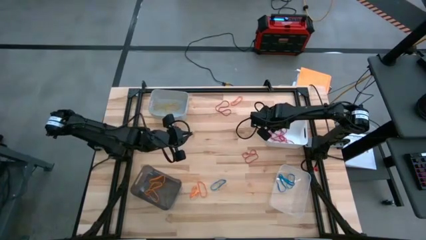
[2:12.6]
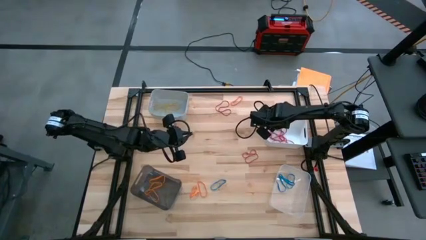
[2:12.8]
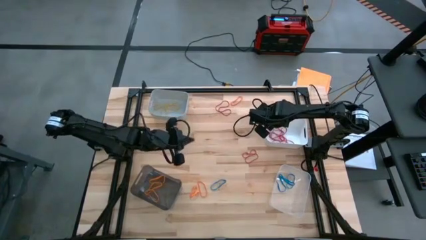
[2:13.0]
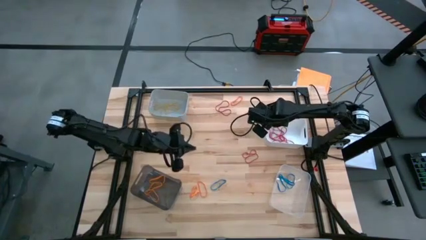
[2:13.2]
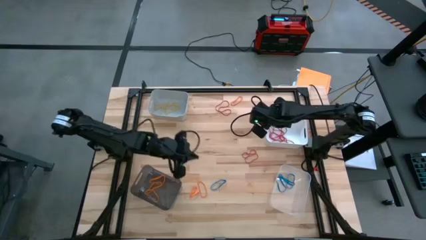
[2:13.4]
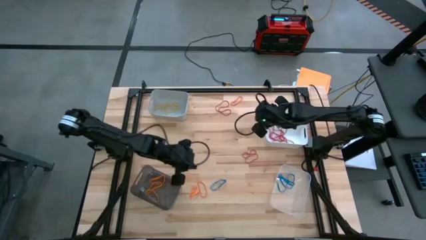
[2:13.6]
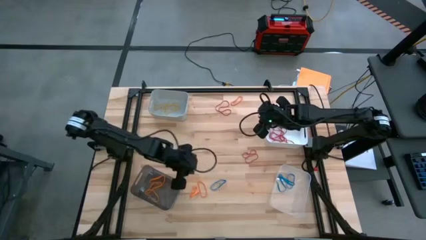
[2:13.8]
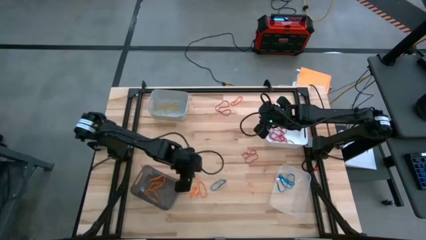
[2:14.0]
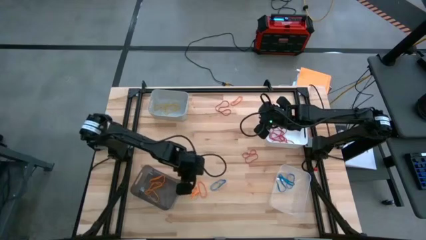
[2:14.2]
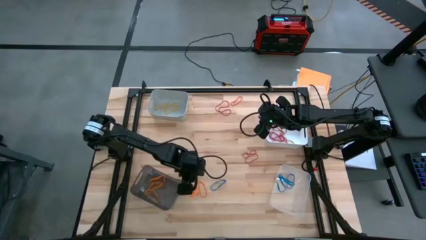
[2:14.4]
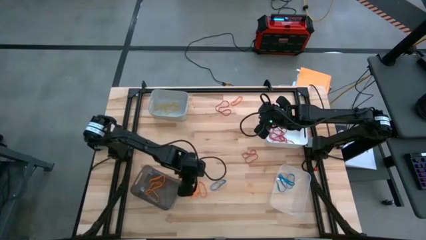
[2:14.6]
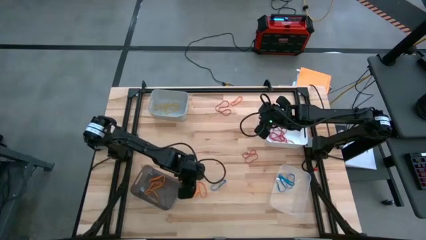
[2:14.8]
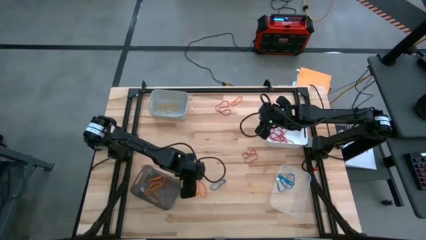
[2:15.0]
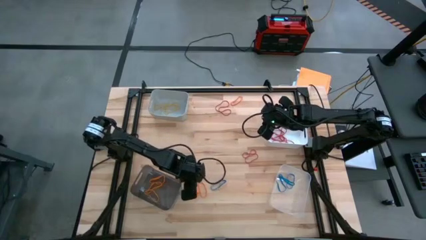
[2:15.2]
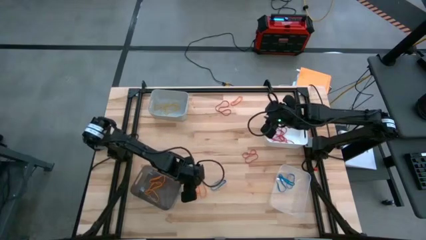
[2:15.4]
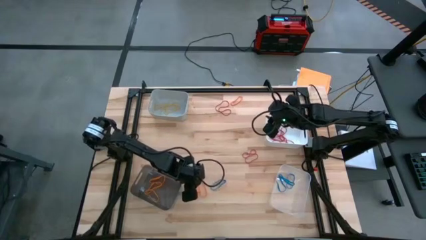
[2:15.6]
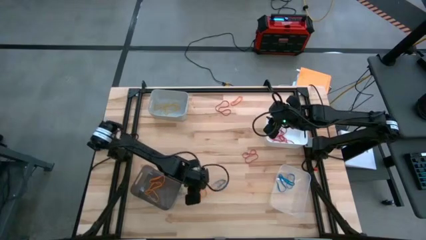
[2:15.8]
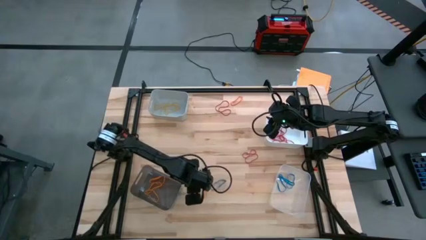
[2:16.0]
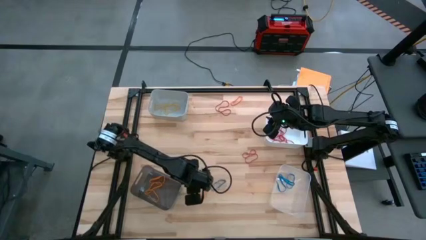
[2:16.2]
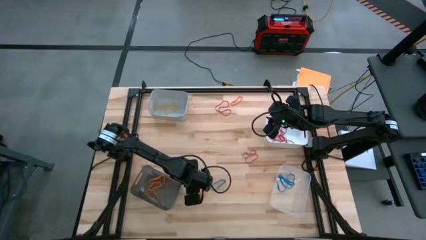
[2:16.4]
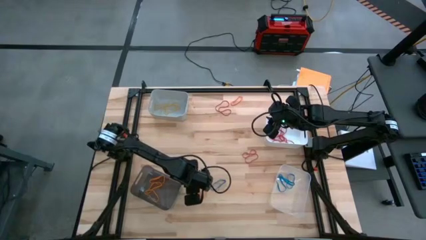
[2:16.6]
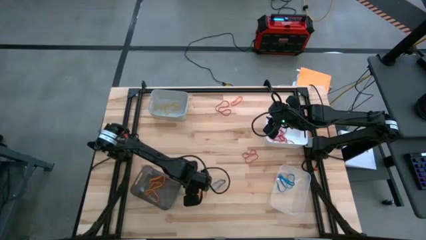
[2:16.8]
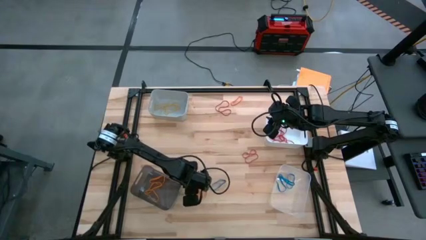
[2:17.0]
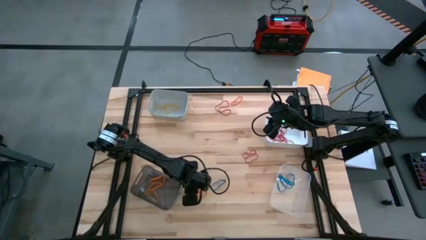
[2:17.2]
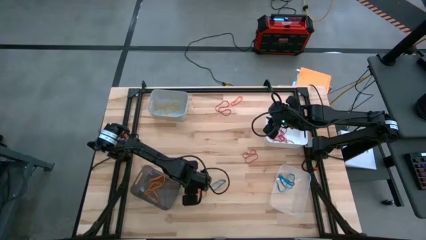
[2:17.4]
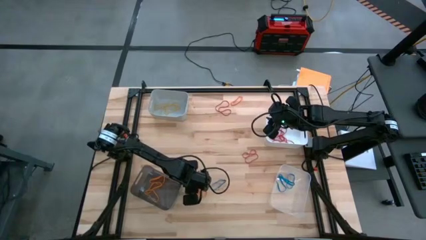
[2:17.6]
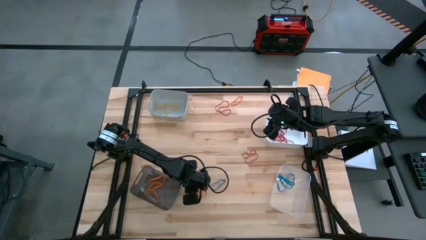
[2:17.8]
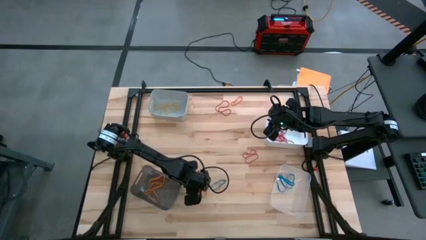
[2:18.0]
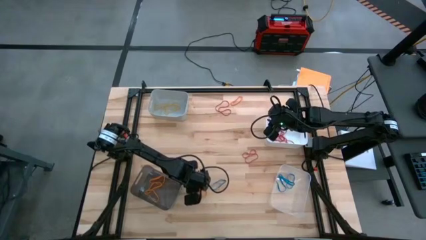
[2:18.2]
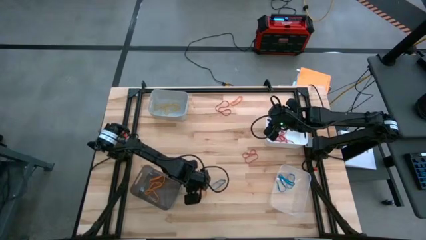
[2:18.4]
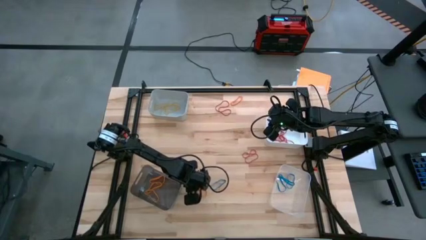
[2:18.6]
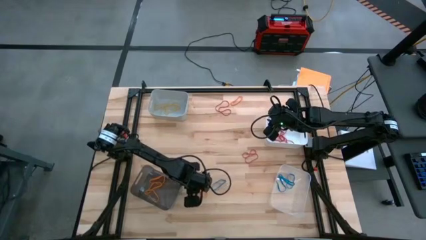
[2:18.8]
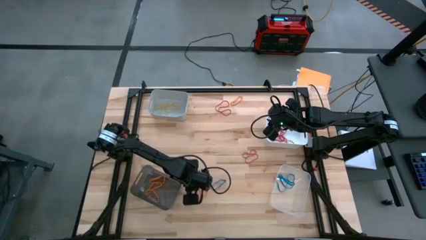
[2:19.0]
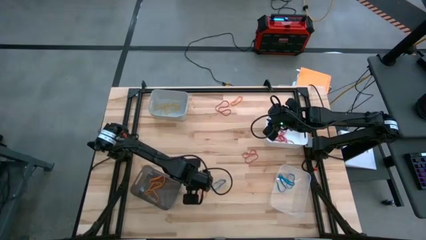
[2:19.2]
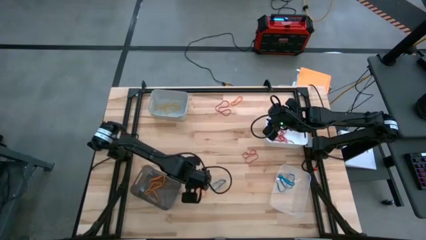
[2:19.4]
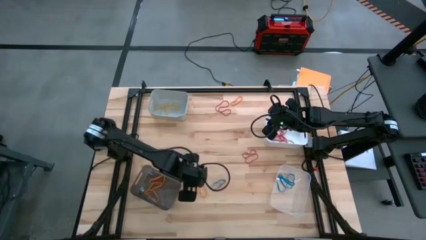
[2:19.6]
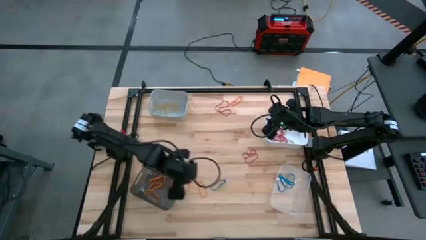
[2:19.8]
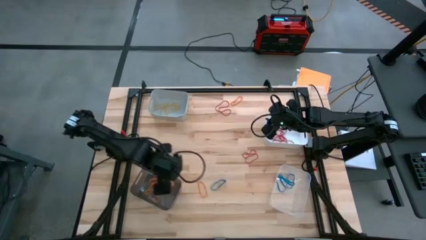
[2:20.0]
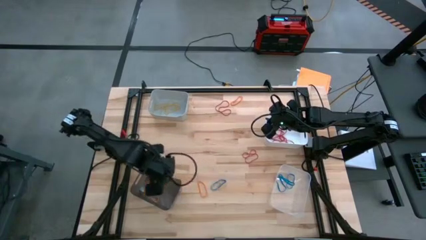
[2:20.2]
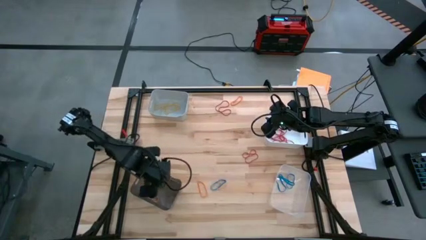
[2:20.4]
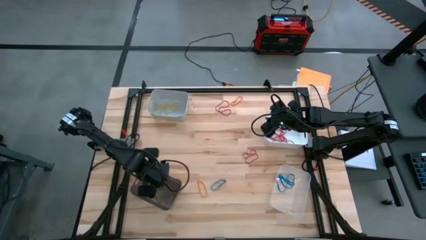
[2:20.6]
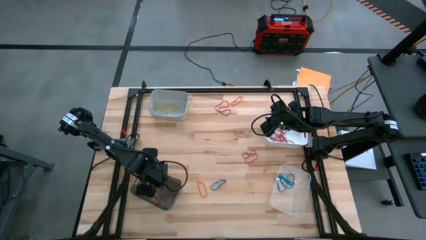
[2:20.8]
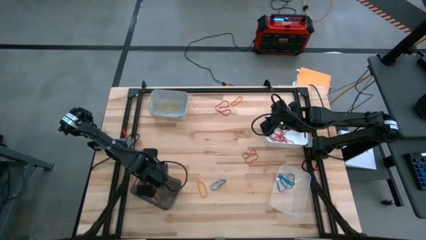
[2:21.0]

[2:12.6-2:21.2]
Task: Sort rubber bands into baskets
Put the orange rubber band into the black bin

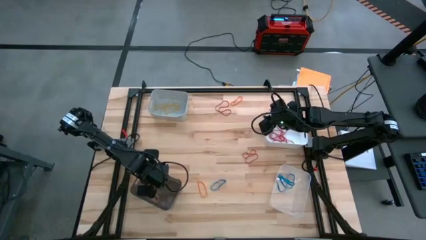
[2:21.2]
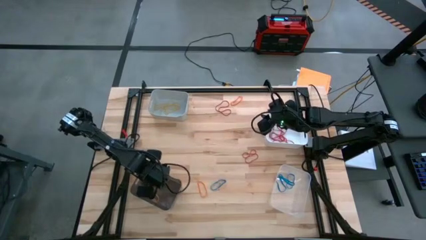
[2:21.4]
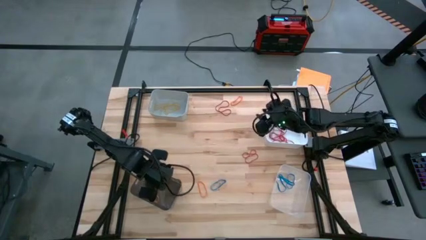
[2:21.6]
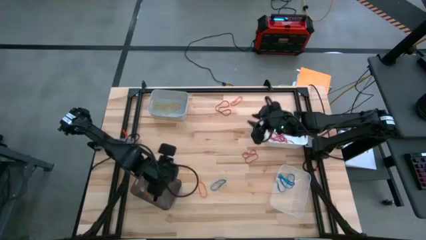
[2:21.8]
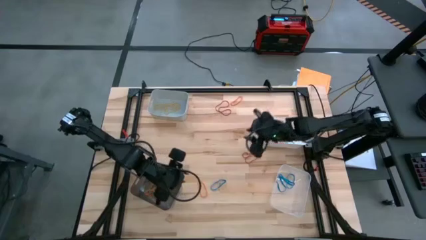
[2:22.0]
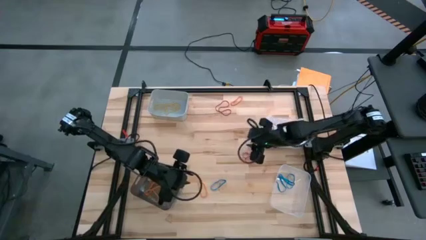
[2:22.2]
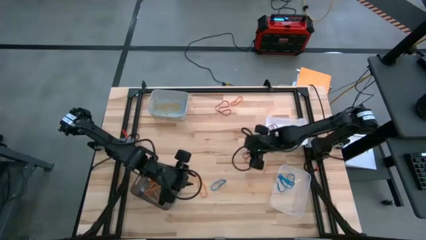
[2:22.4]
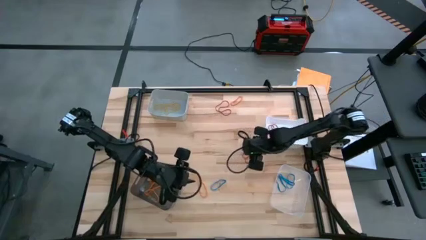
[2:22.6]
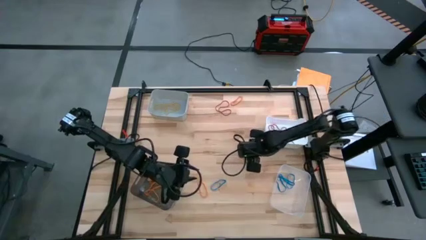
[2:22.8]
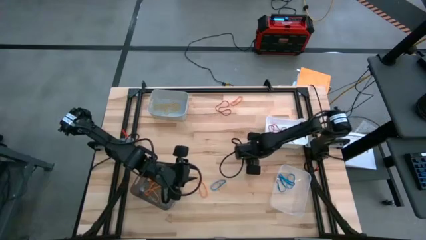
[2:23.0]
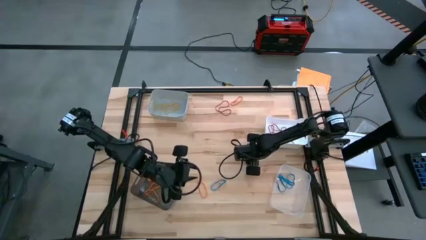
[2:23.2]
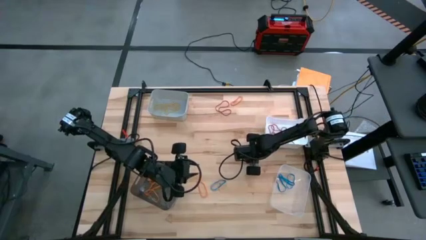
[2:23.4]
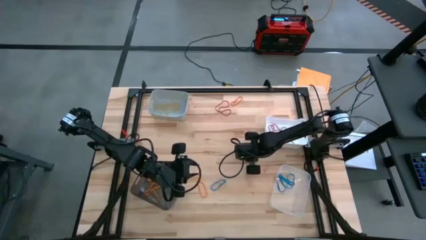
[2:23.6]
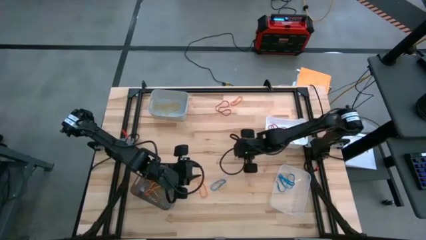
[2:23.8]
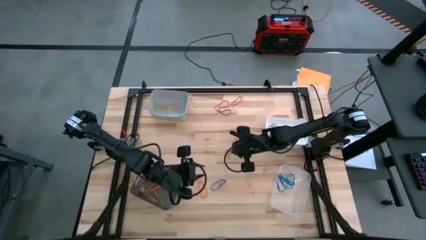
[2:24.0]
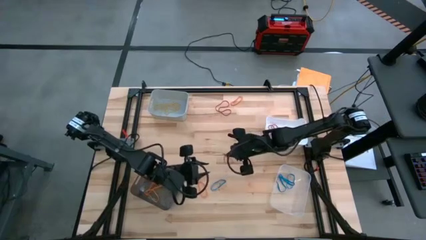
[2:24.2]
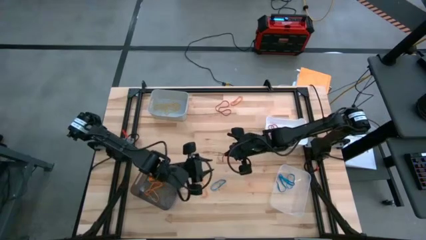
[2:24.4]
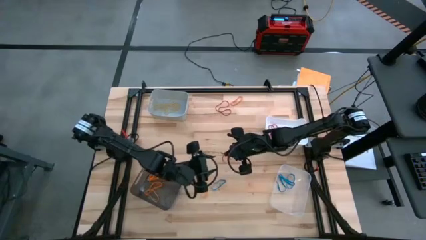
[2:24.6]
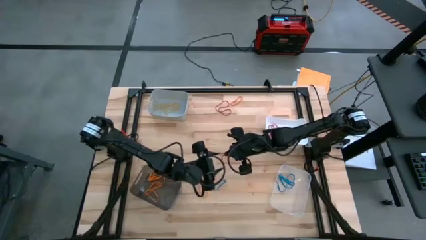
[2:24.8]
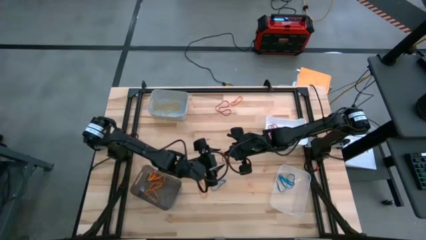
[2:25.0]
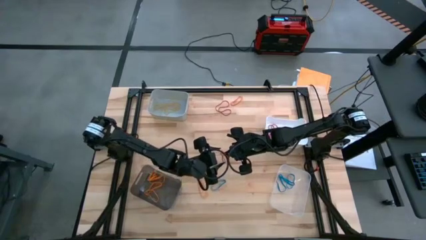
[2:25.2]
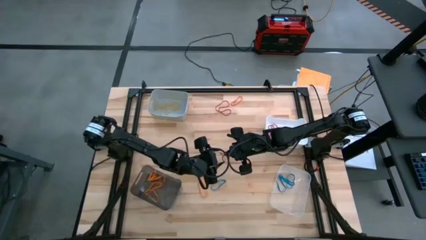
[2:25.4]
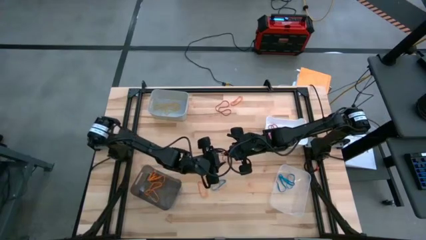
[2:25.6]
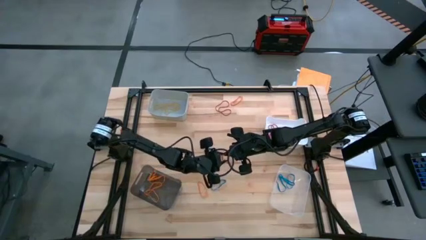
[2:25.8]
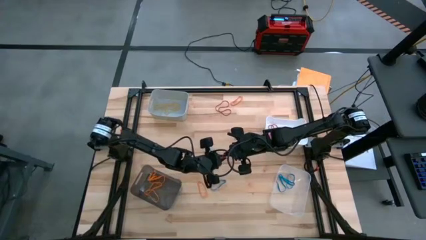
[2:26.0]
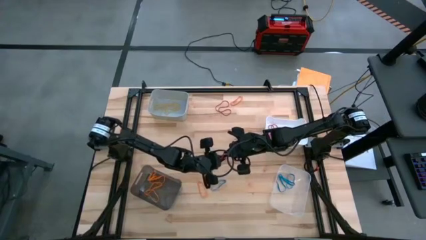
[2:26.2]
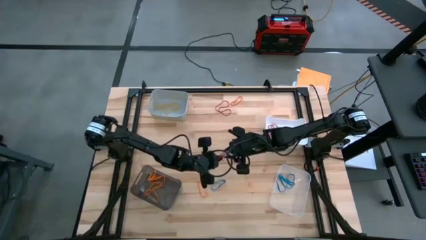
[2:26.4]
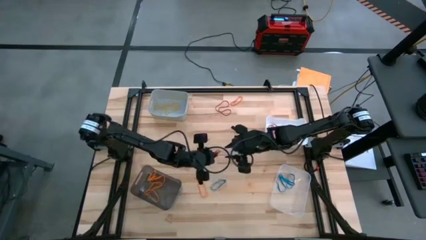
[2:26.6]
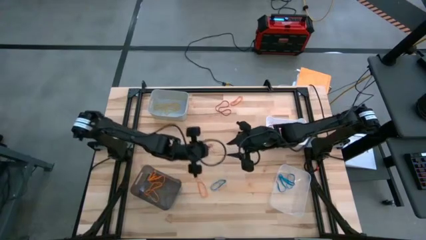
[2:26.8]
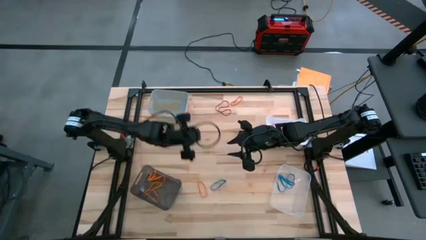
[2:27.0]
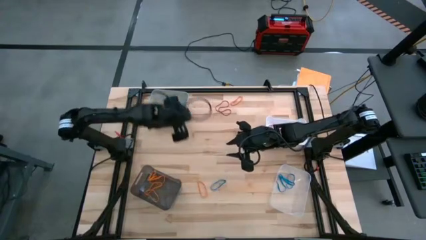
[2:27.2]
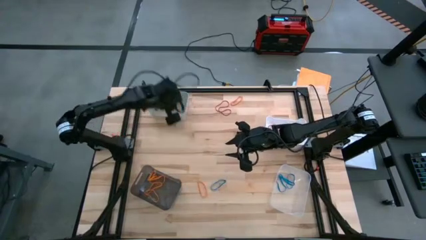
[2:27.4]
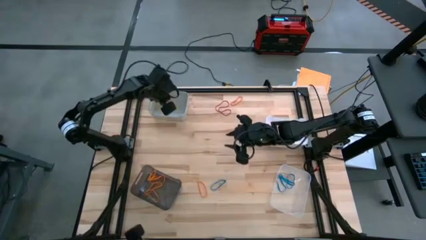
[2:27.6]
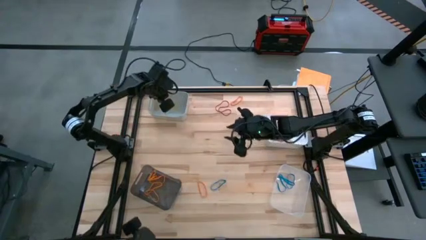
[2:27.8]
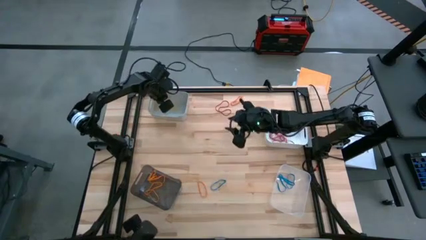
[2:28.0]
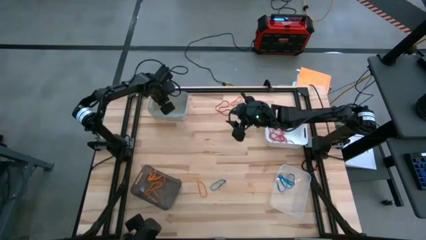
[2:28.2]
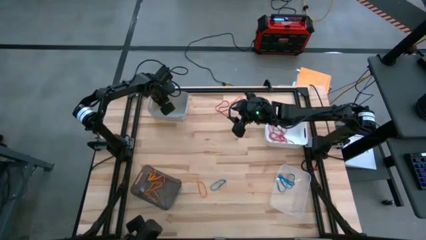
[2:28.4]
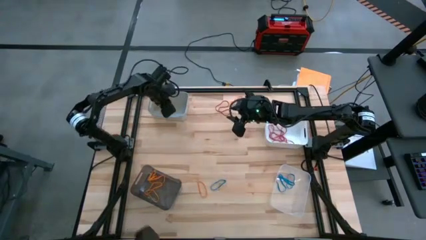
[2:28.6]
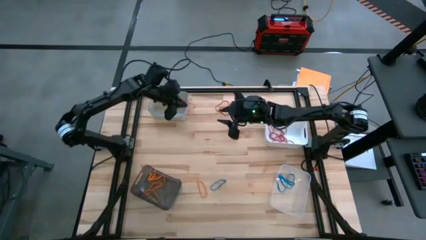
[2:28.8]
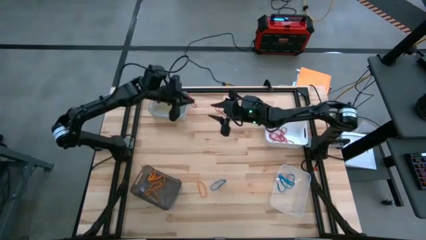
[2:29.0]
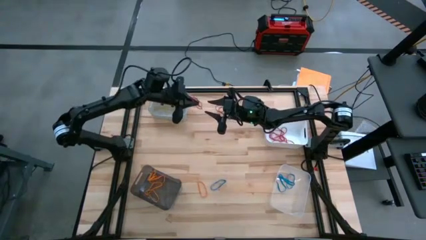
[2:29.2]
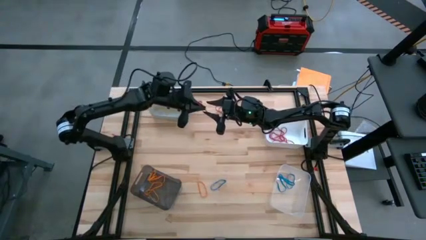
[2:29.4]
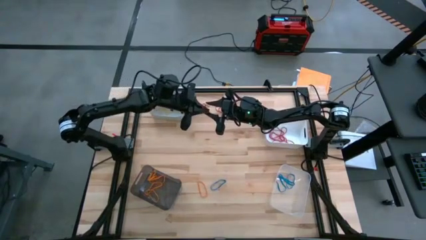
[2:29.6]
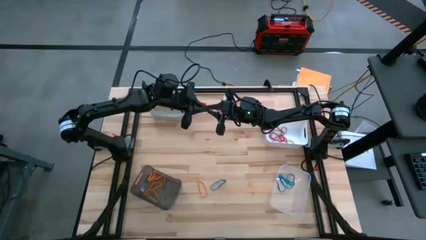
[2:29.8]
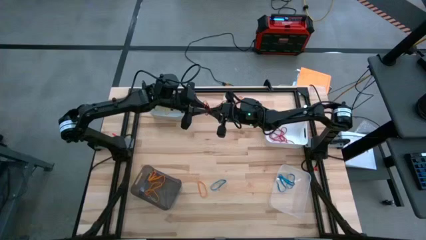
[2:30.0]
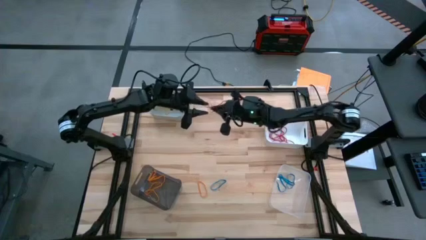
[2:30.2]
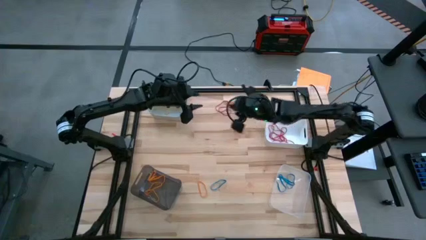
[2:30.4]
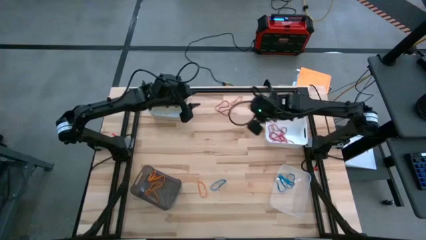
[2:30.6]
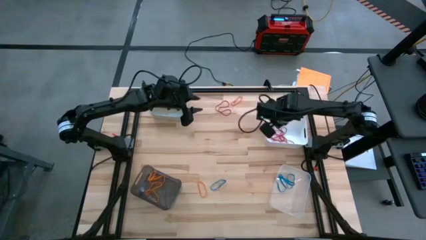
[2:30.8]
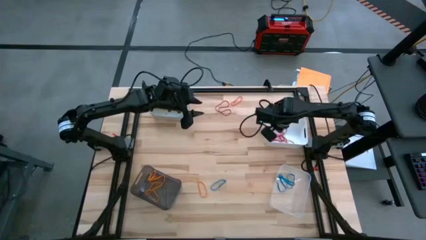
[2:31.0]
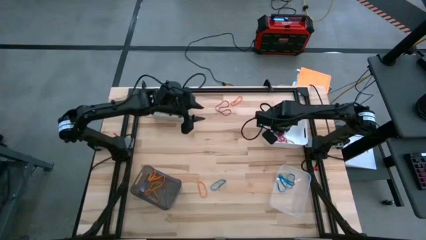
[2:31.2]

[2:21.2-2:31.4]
Put the red rubber band into the white bin
